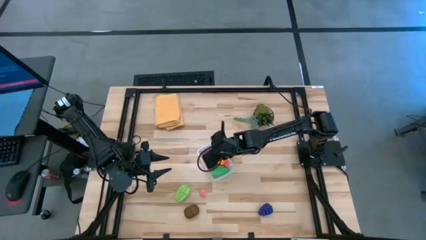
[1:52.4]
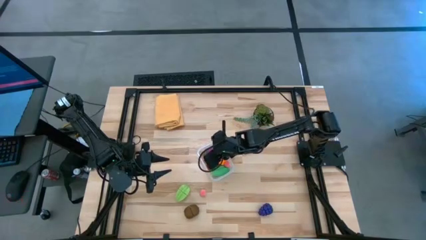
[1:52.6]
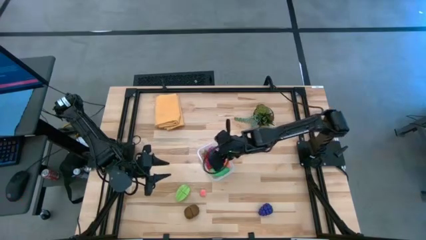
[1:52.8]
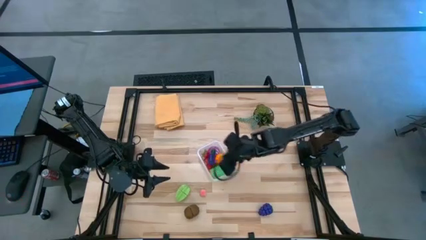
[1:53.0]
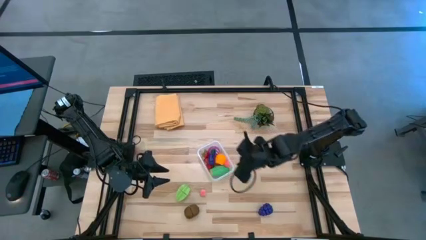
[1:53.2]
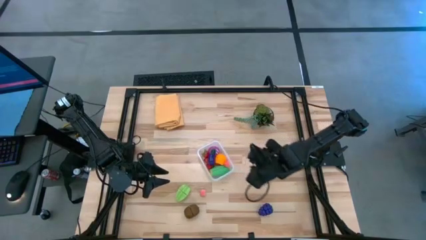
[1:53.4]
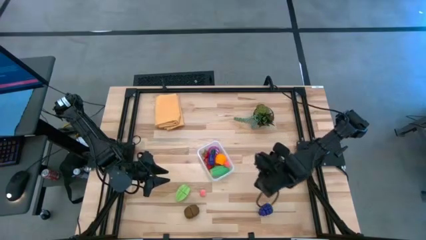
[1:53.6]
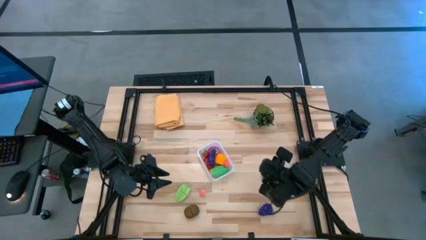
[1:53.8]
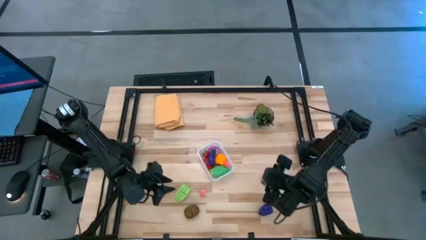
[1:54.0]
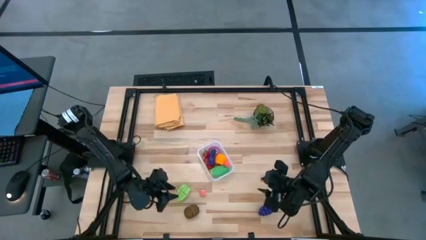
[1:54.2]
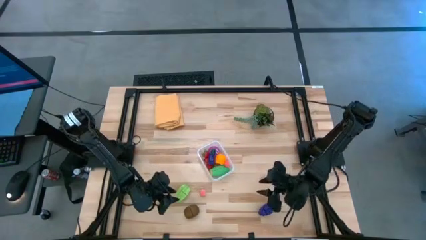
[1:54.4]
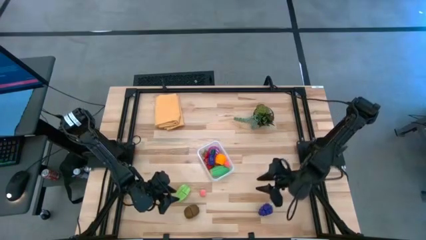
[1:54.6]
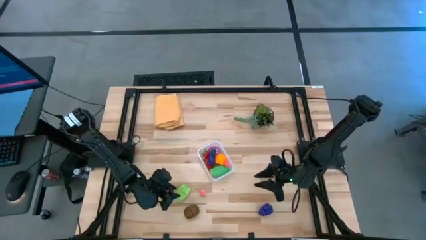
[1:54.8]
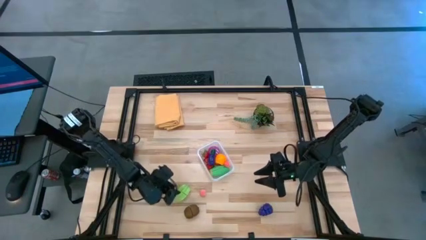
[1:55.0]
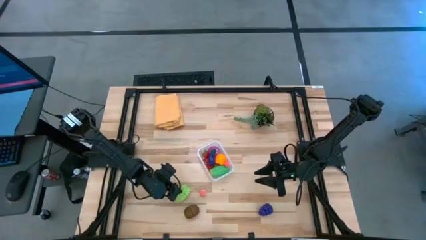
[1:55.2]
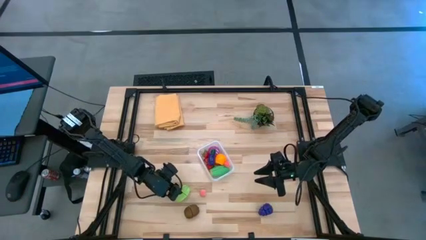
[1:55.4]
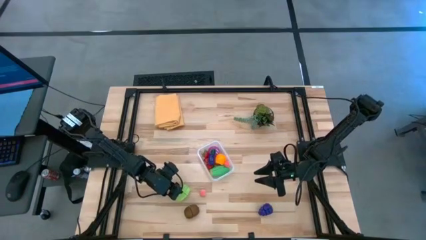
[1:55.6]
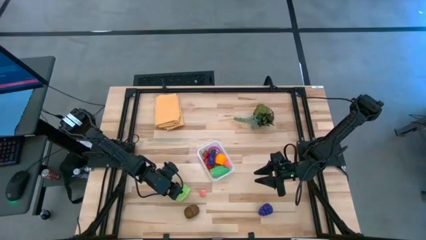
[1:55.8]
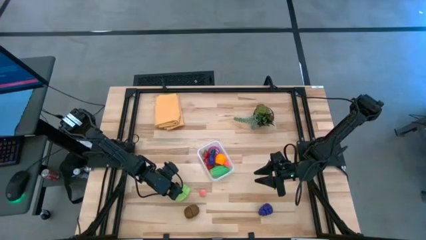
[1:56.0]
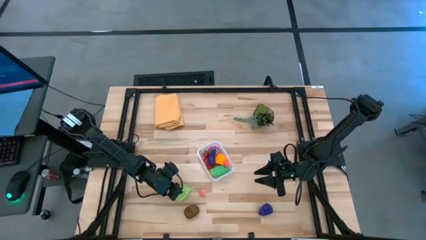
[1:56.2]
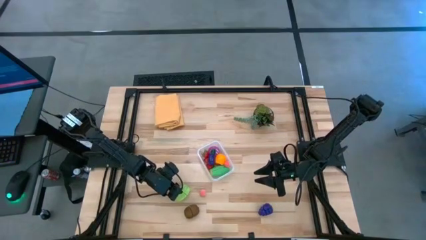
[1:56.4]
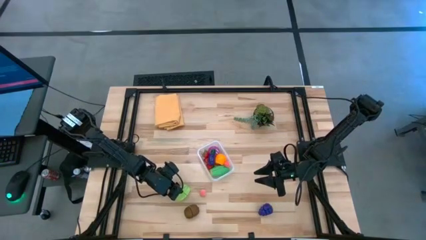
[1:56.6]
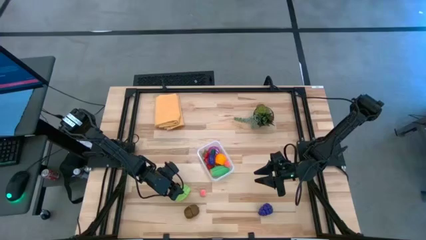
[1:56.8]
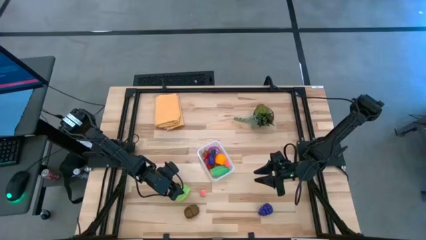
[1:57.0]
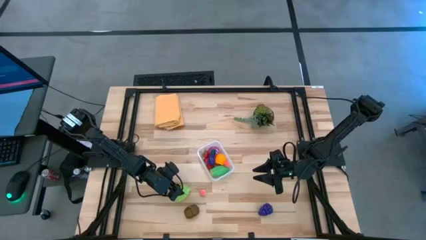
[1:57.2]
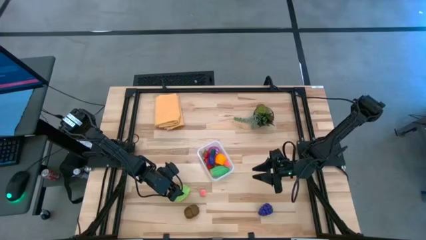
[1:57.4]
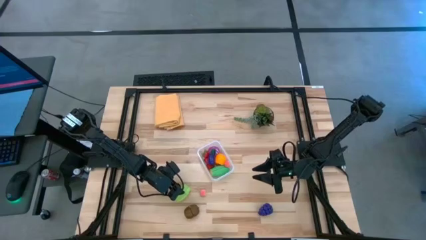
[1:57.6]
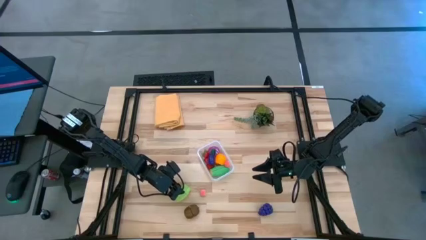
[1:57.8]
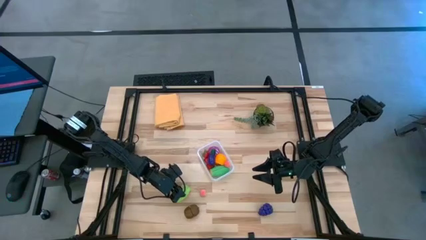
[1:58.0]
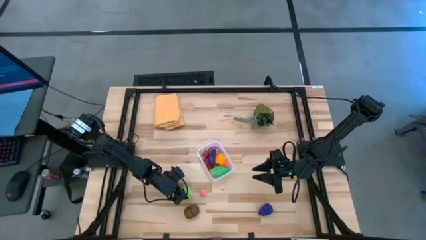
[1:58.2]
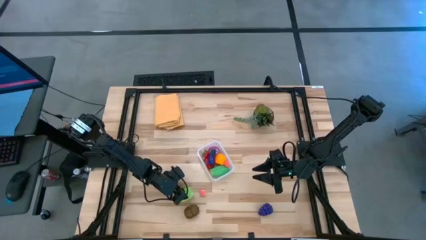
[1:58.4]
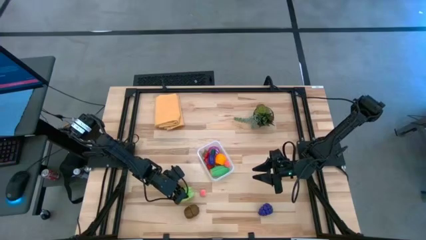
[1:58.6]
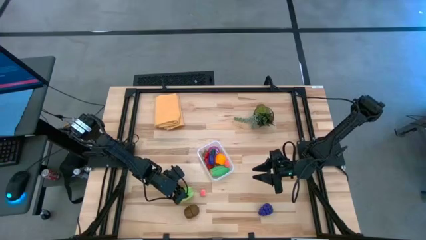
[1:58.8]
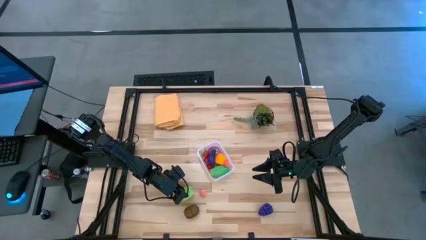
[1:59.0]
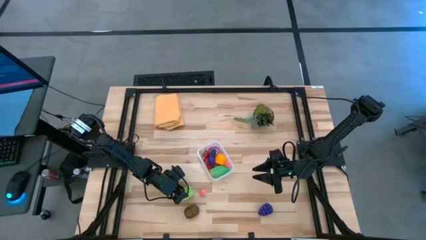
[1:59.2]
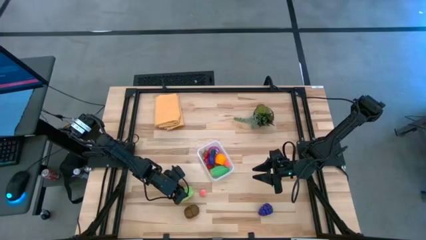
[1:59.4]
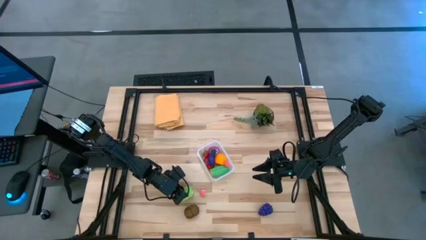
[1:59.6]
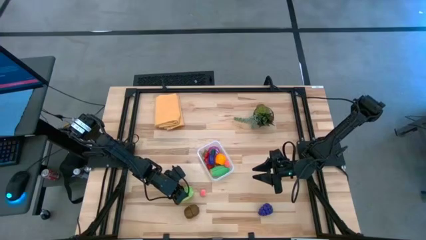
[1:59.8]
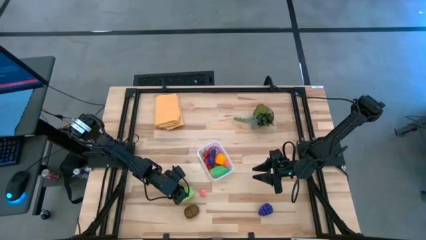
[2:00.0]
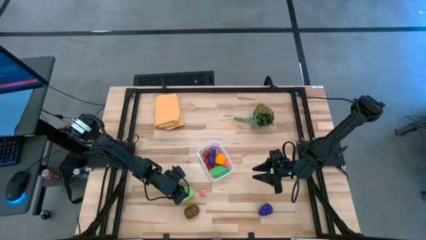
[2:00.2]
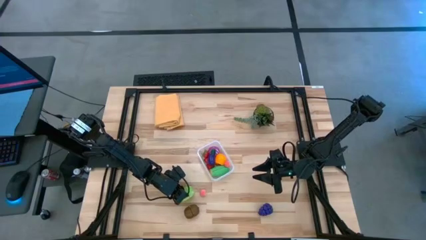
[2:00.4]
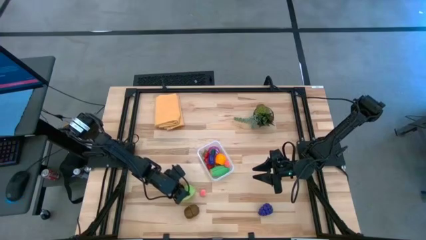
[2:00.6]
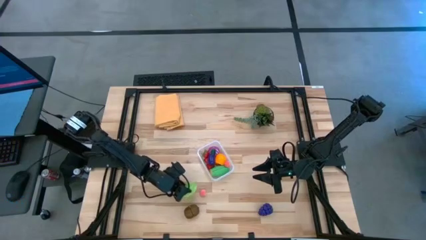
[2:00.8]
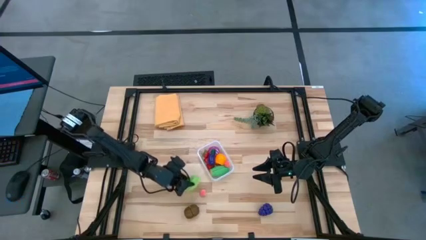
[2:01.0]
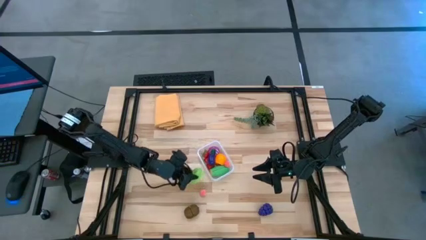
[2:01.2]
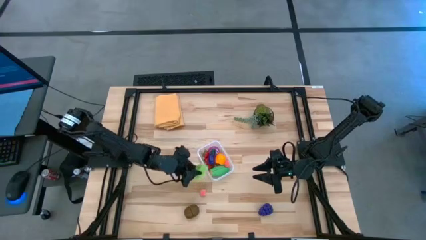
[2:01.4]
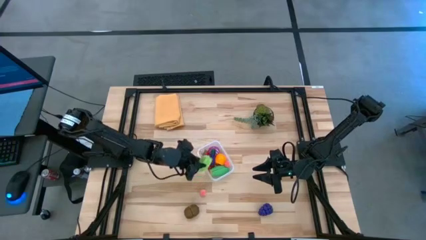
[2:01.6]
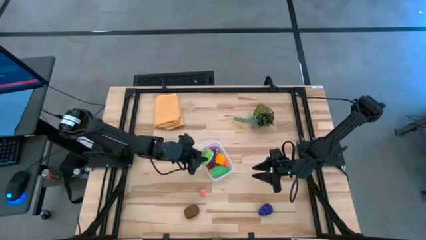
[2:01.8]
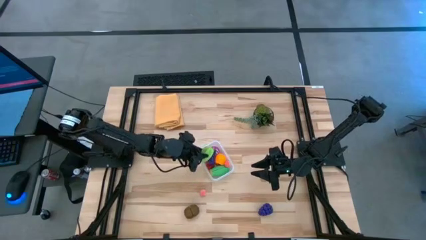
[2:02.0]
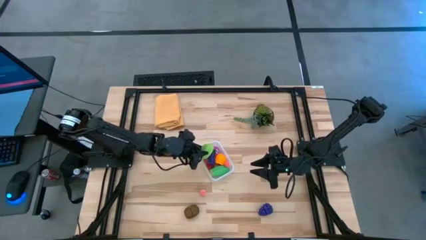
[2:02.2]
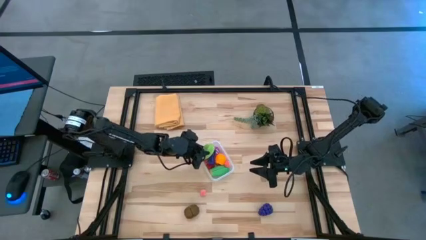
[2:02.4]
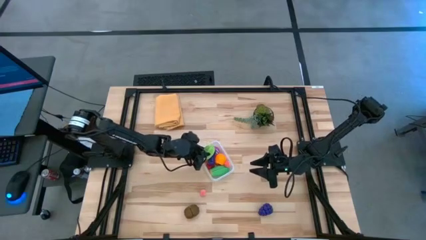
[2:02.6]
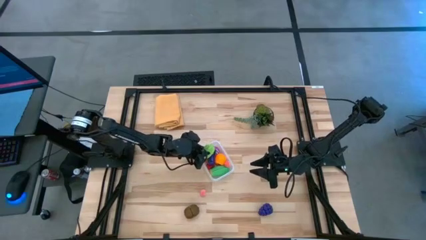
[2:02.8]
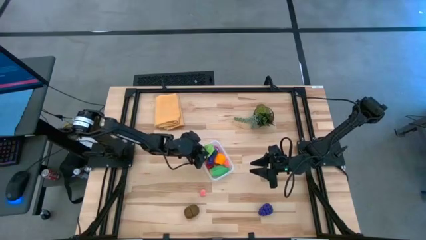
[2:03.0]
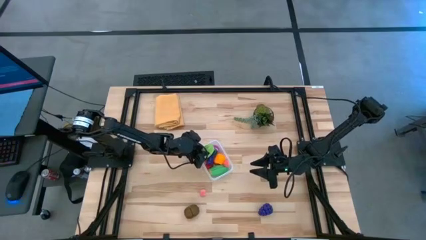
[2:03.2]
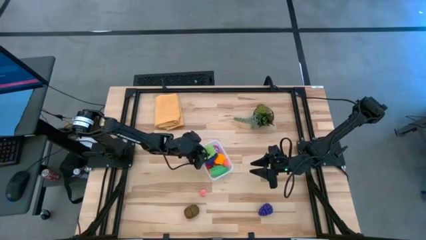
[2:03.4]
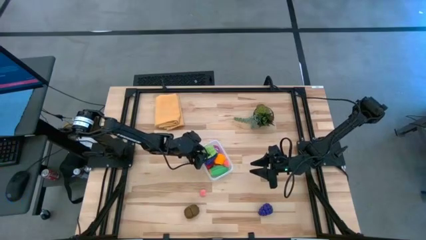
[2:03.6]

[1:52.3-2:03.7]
Task: Pick and placing Produce into tupperware
Put the green star fruit into the transparent bin
